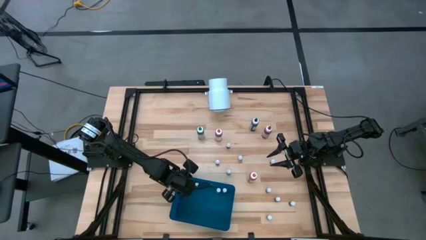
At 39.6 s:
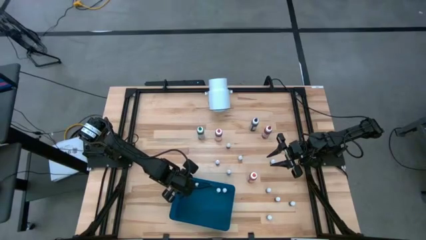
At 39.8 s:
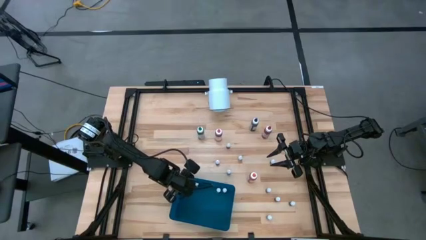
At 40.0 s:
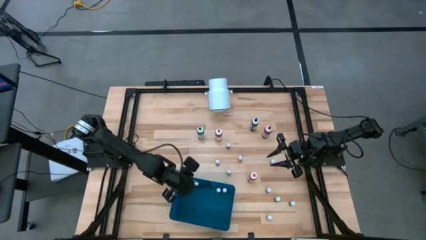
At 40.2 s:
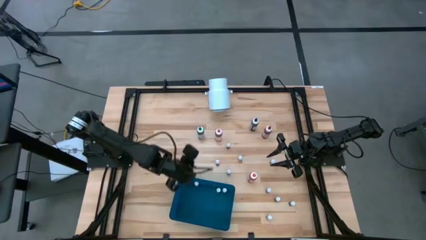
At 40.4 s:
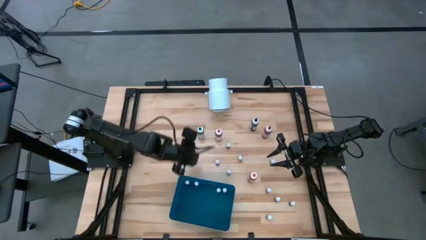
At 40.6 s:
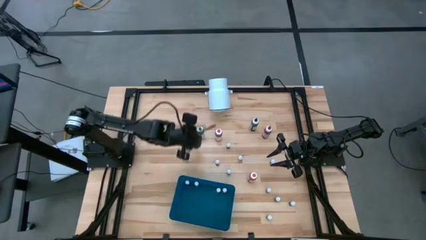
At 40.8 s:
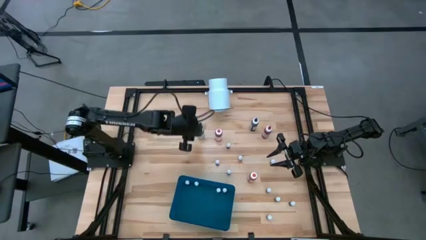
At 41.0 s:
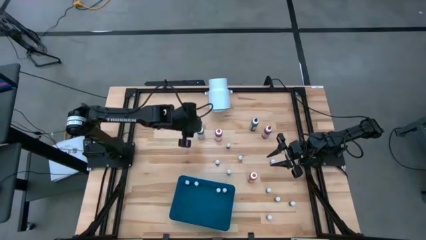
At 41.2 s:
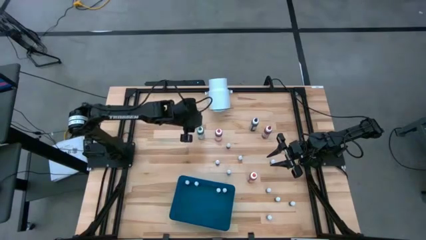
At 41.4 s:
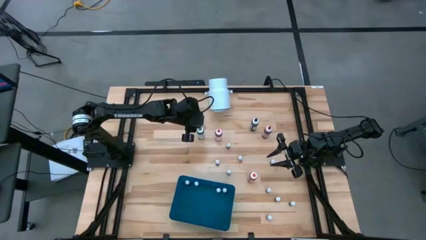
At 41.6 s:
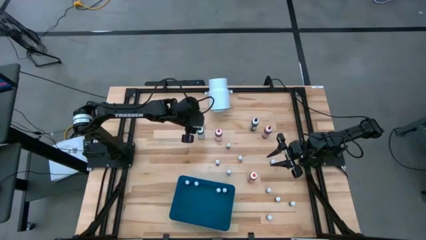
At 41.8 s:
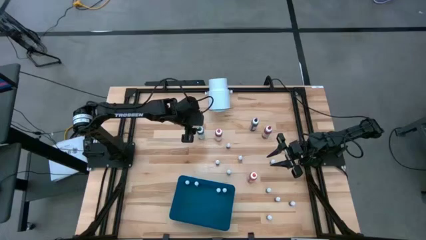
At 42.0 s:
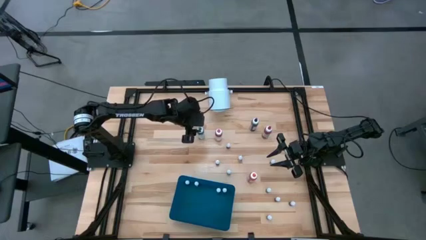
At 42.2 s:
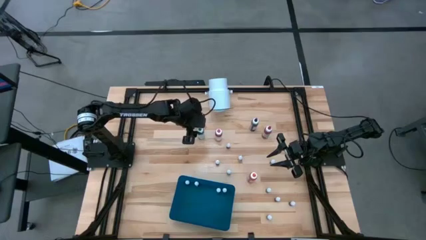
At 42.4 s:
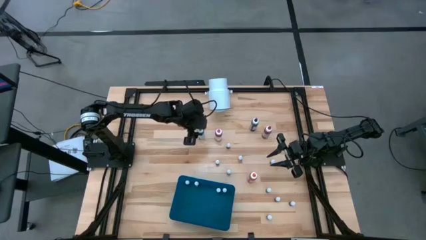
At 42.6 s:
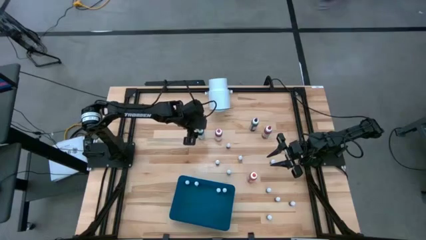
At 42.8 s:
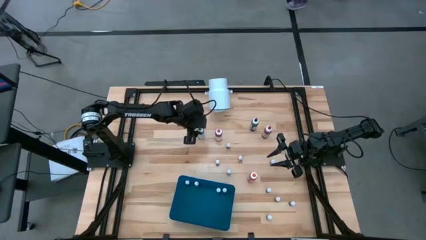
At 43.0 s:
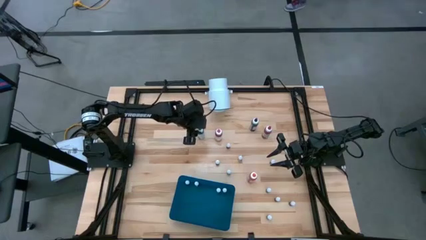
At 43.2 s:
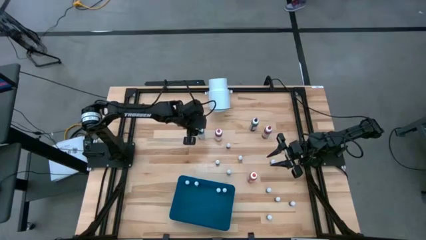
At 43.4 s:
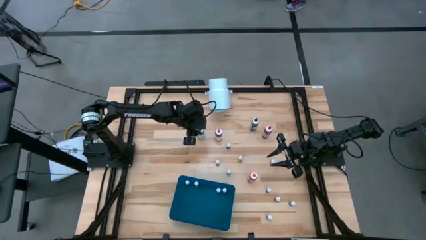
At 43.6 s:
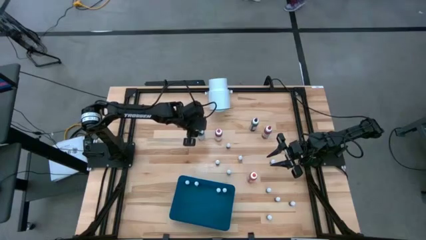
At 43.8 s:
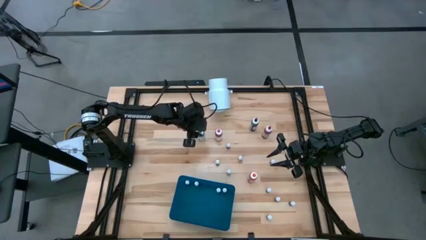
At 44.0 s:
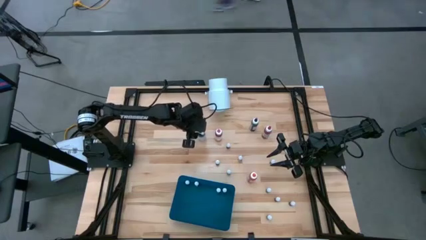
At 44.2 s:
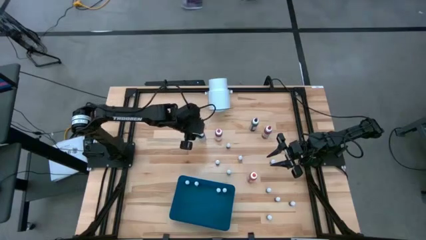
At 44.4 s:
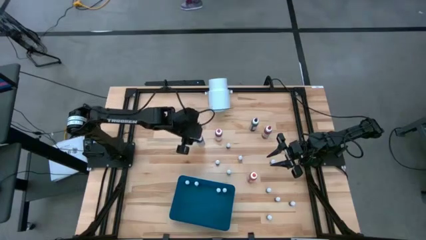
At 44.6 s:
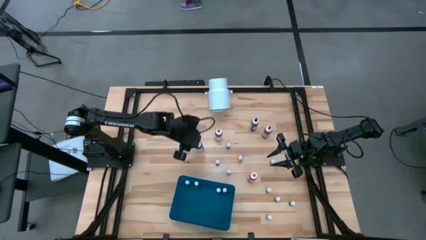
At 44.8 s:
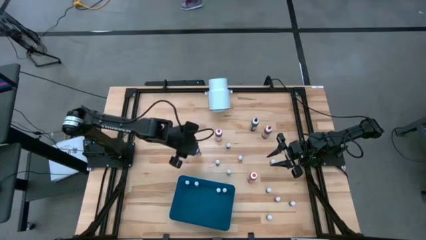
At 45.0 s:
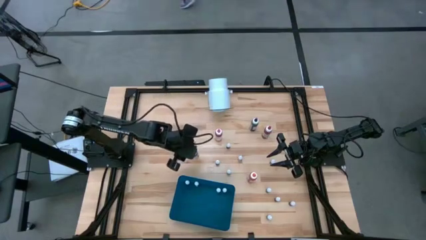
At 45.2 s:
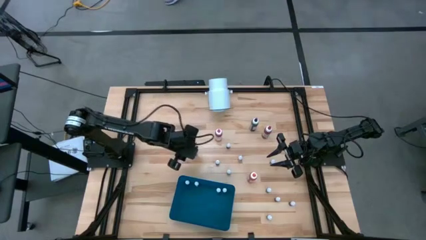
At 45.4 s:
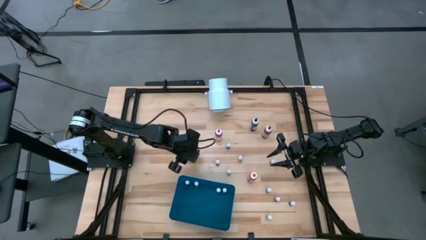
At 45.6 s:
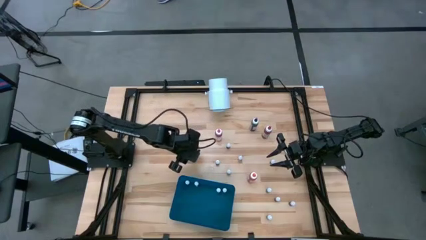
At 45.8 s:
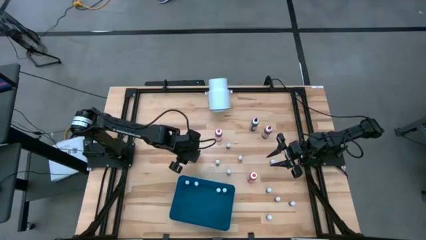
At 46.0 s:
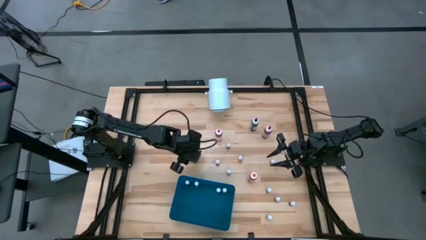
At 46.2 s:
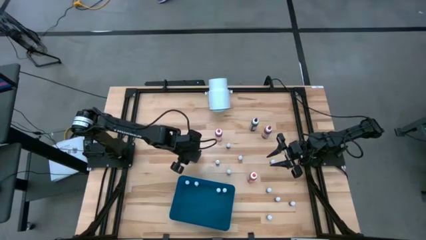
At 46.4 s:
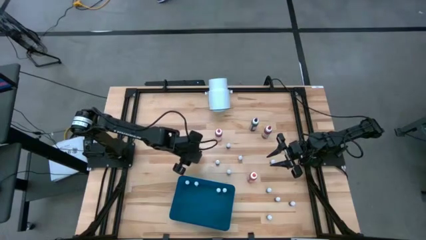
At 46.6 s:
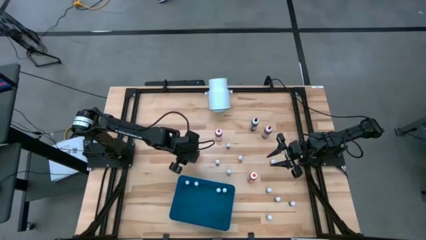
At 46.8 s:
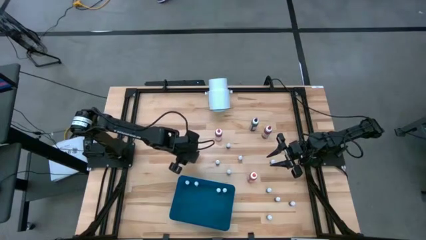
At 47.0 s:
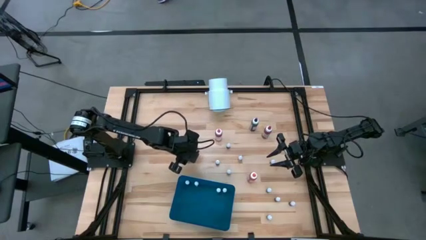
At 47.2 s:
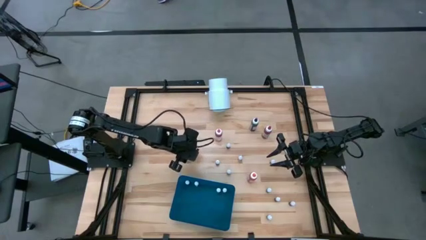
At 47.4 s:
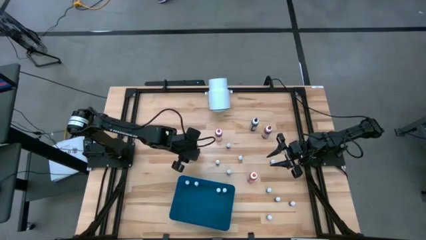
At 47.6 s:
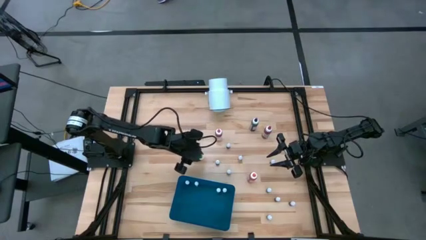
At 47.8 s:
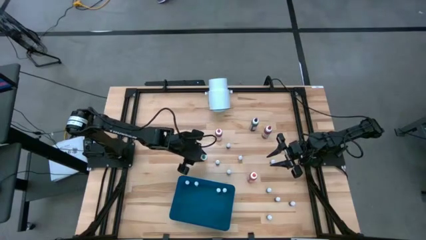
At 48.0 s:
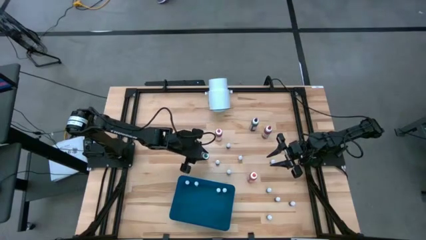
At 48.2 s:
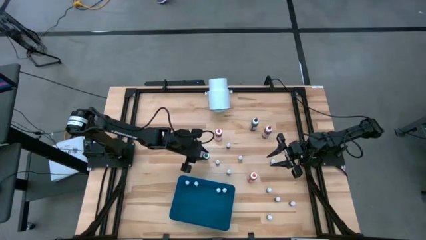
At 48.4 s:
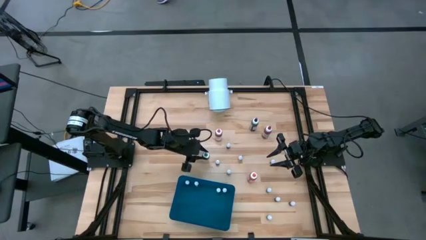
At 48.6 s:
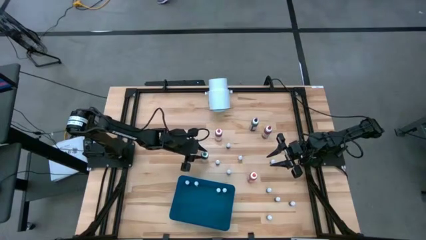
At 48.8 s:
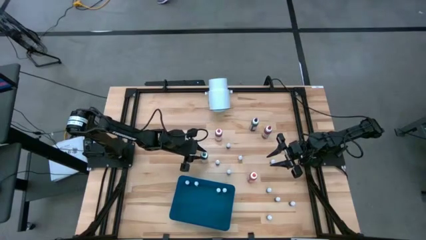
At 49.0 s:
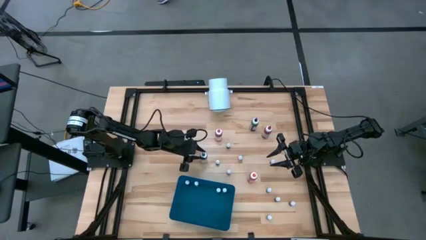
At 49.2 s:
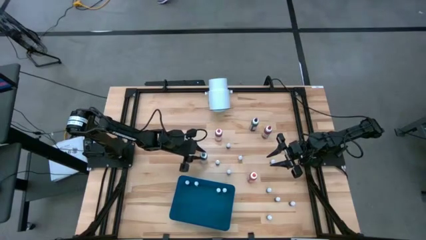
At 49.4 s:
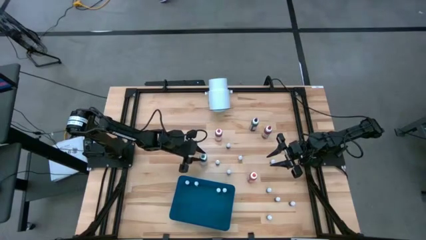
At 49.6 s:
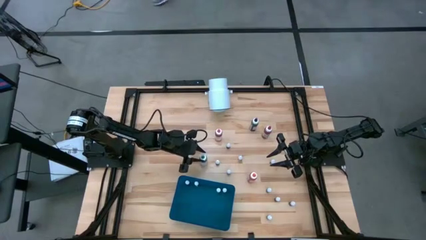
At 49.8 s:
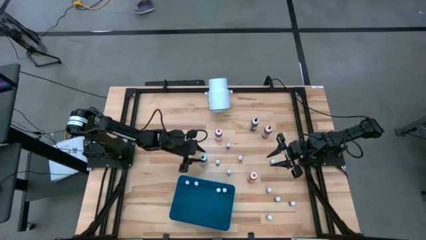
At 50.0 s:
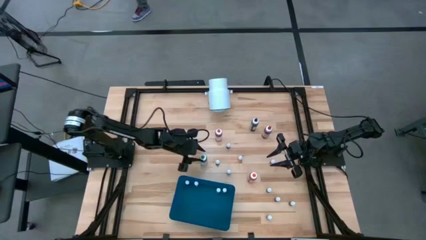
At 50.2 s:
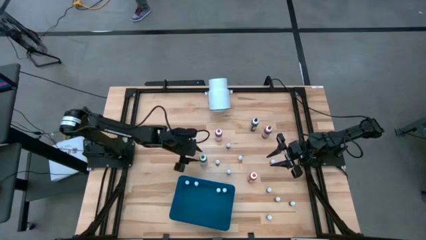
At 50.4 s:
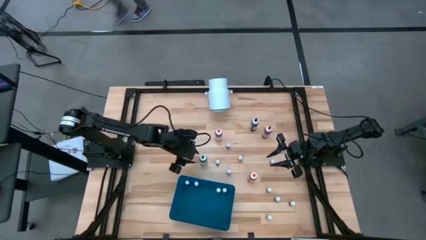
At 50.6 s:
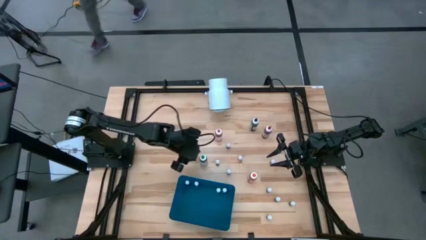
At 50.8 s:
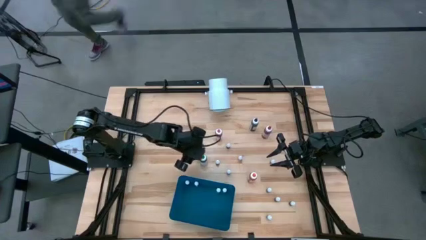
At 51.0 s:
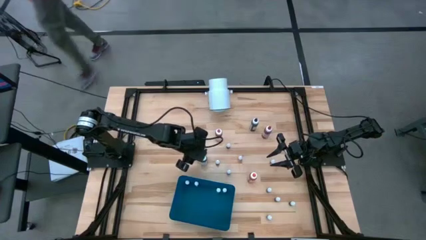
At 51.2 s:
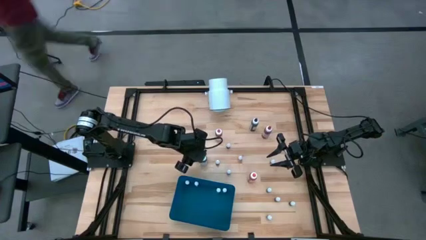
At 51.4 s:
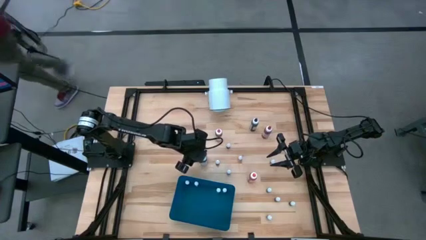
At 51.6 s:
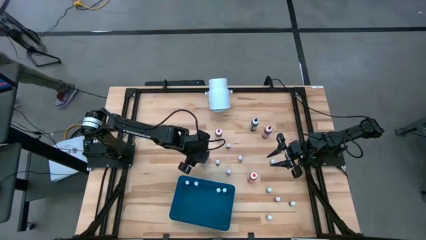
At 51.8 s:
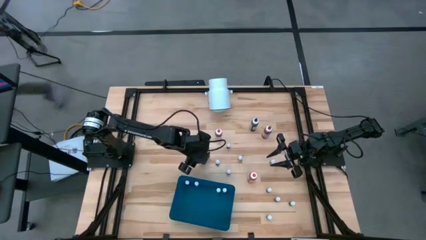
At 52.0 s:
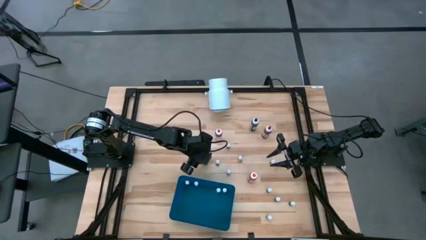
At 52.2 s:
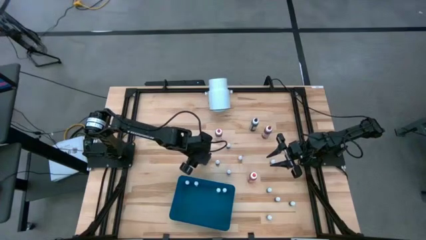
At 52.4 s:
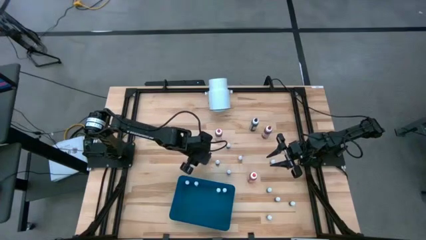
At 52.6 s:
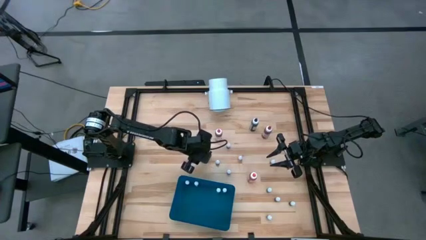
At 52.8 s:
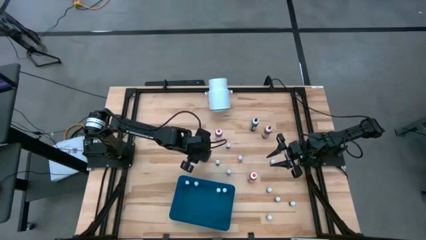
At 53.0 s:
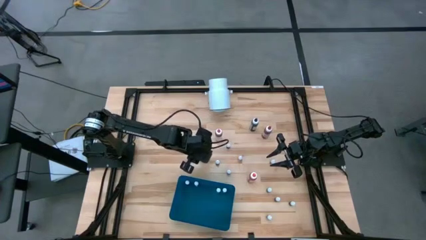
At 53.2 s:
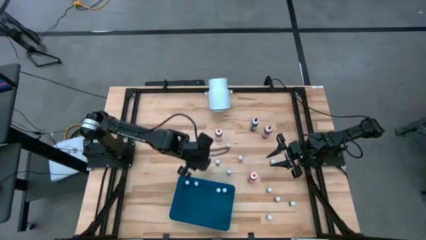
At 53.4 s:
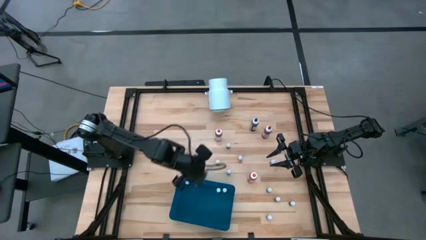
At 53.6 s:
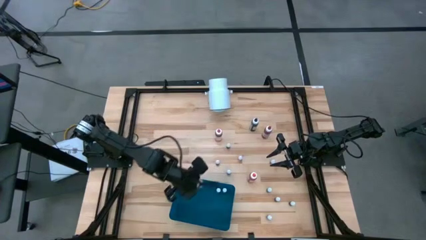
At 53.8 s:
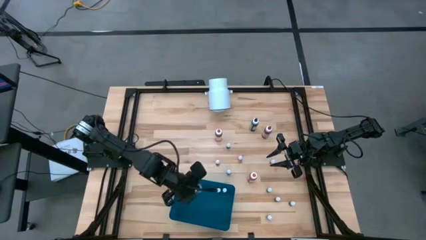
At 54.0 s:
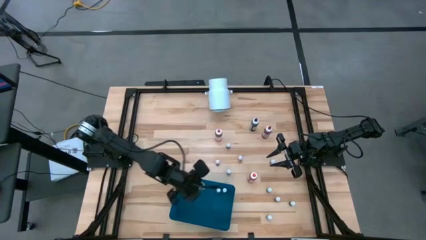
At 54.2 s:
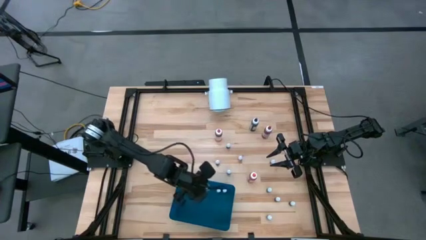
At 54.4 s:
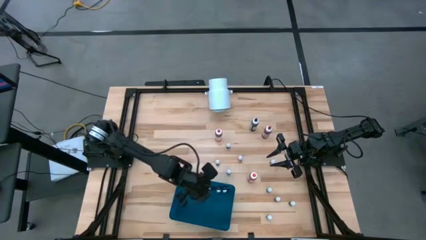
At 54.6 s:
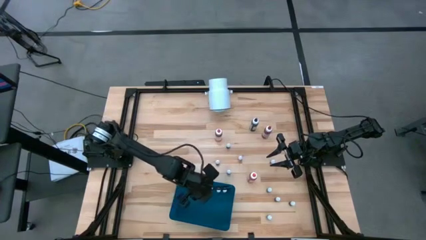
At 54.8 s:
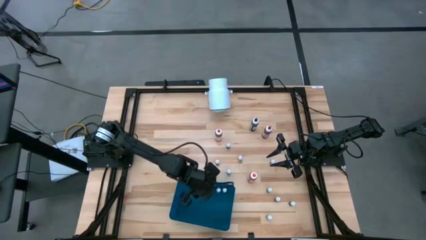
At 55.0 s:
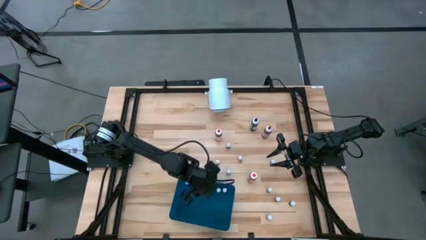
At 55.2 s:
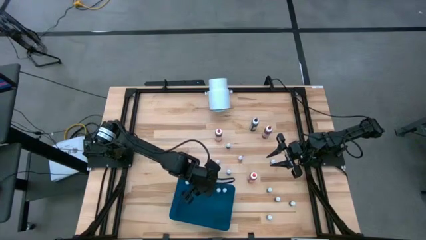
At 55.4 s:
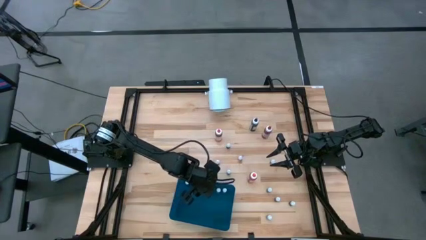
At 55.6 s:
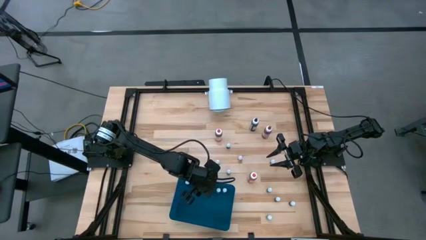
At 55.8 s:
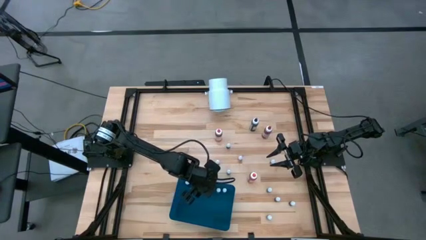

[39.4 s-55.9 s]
Task: Pick & Place food coloring
Put the large green food coloring bottle into the blue bin
